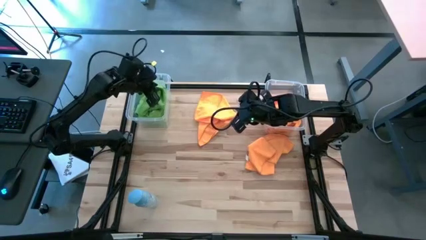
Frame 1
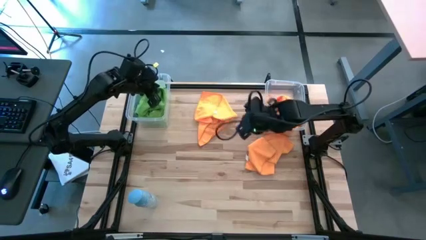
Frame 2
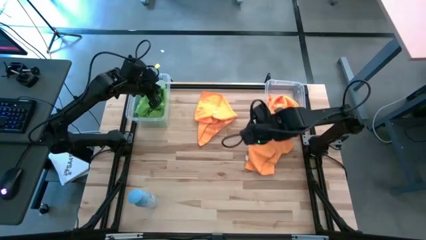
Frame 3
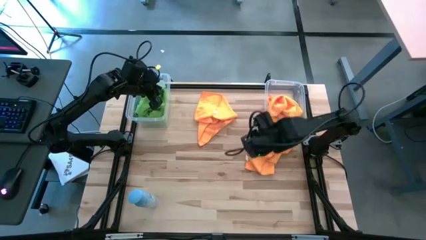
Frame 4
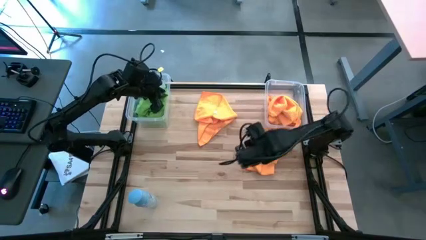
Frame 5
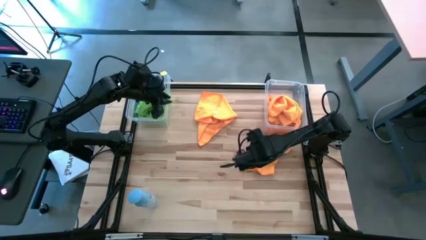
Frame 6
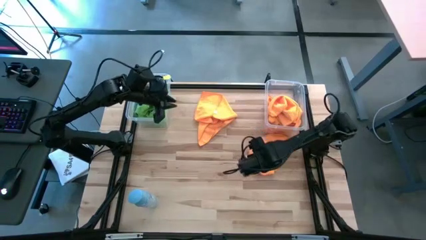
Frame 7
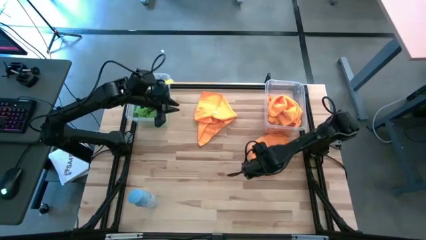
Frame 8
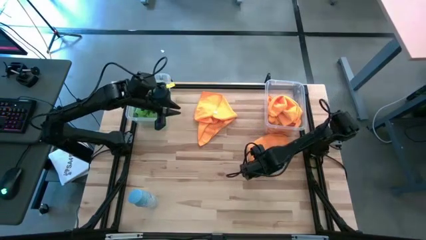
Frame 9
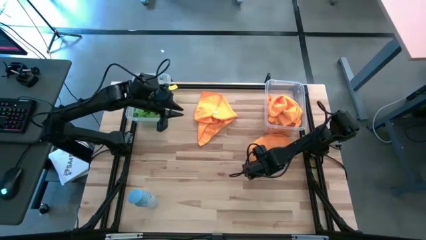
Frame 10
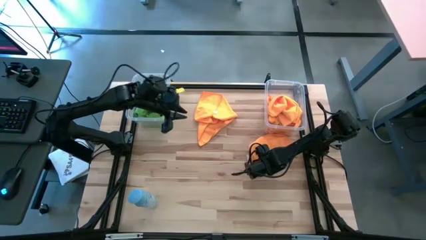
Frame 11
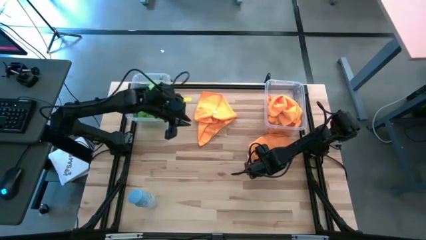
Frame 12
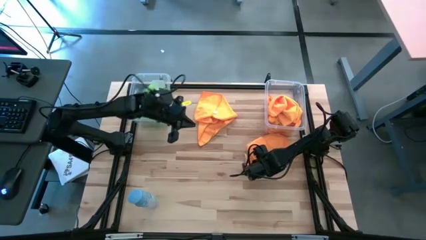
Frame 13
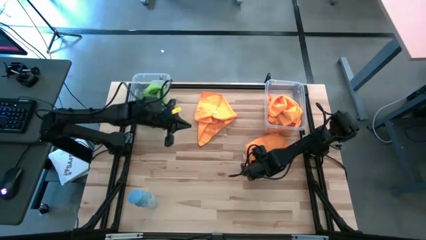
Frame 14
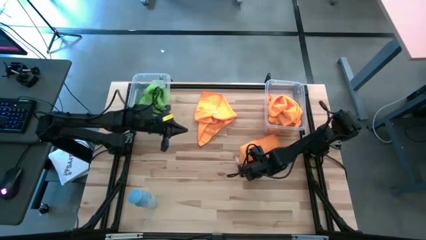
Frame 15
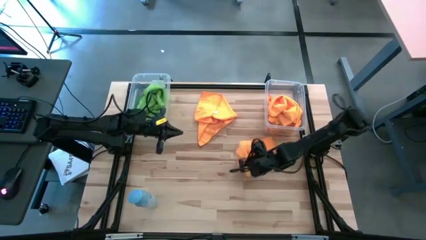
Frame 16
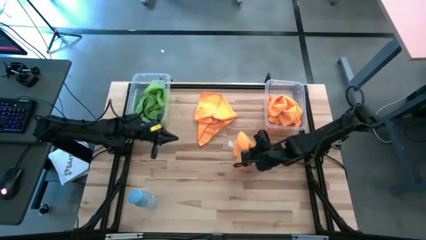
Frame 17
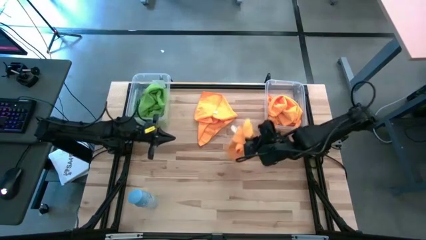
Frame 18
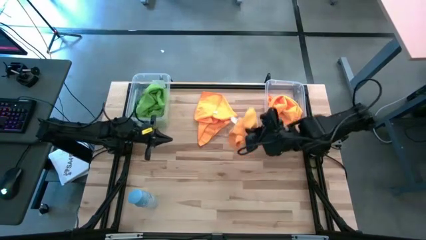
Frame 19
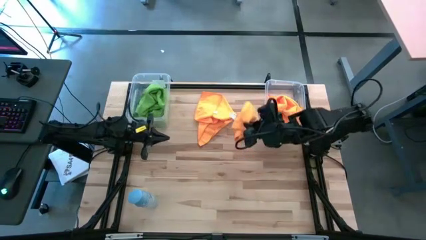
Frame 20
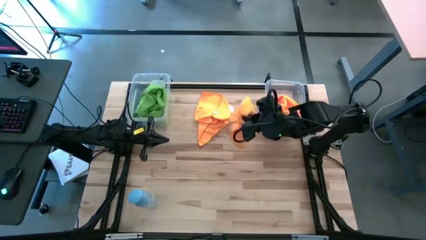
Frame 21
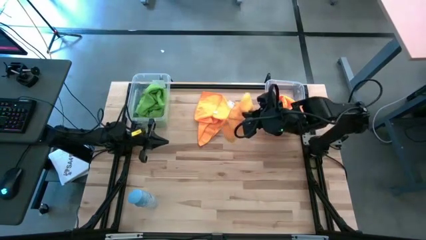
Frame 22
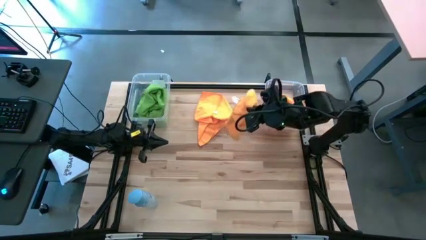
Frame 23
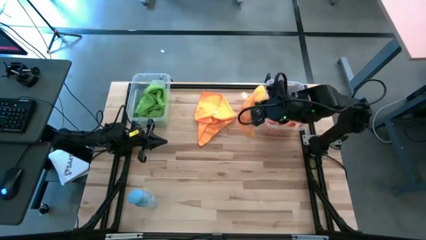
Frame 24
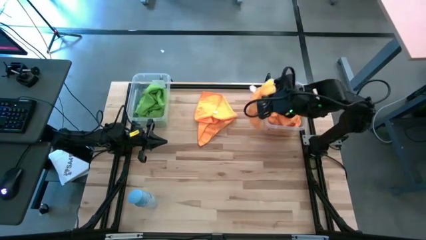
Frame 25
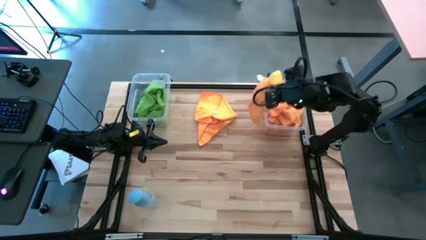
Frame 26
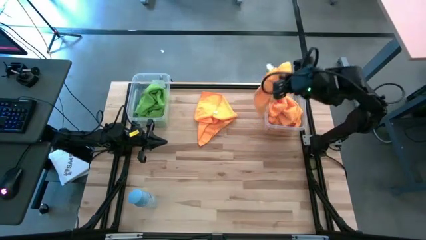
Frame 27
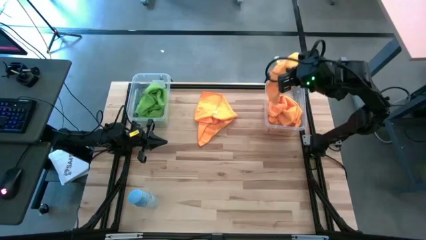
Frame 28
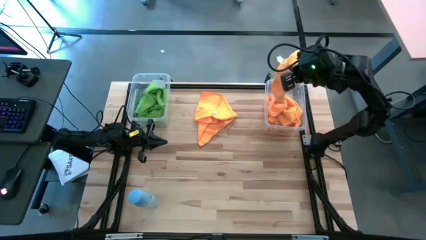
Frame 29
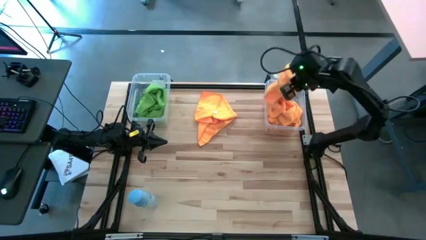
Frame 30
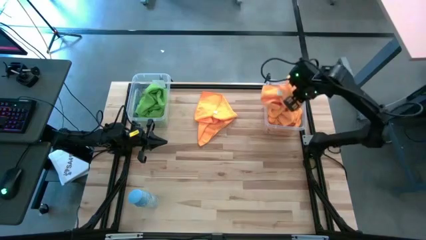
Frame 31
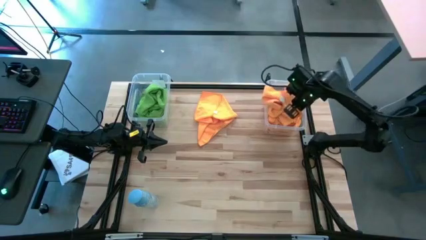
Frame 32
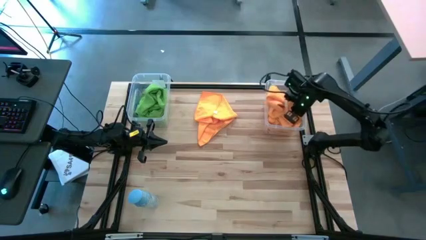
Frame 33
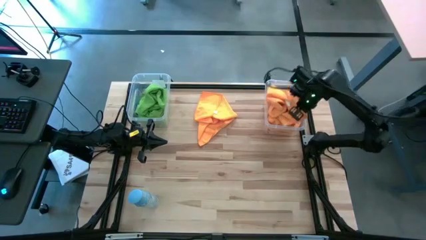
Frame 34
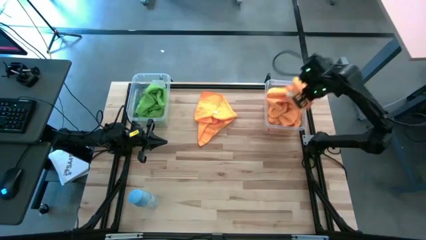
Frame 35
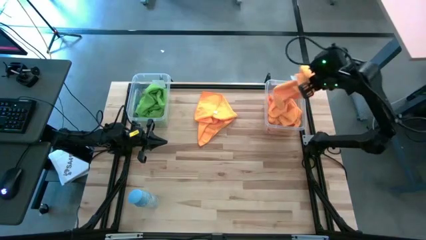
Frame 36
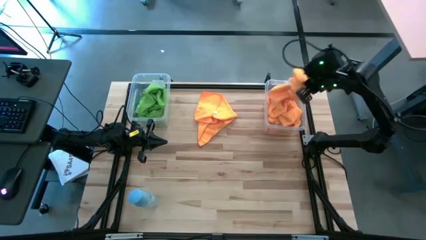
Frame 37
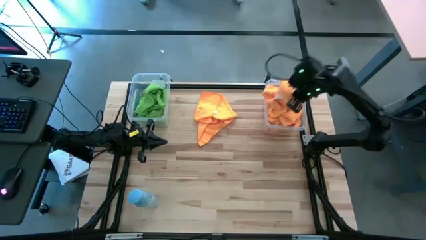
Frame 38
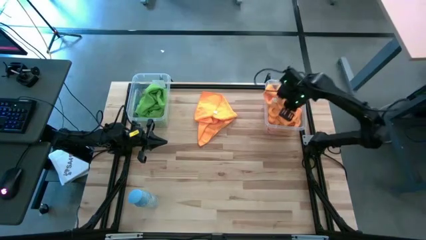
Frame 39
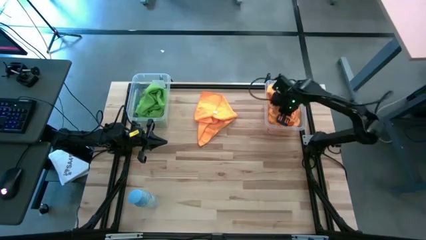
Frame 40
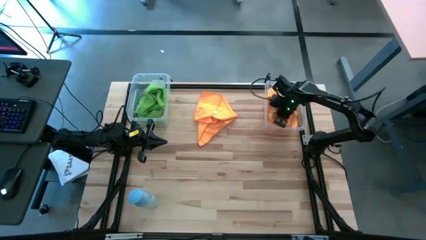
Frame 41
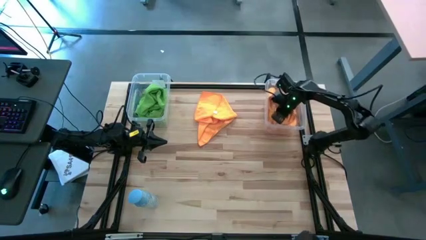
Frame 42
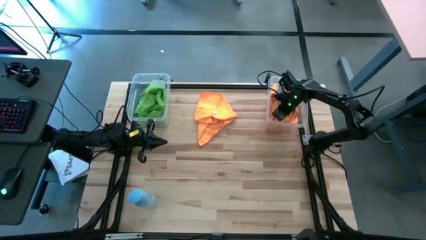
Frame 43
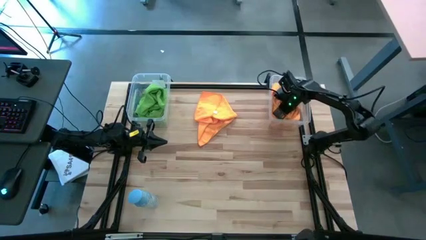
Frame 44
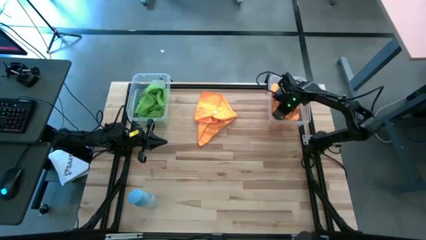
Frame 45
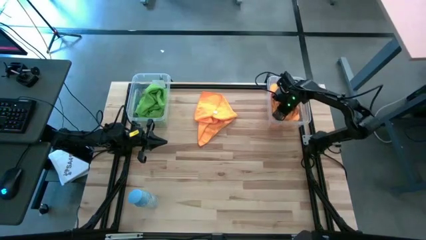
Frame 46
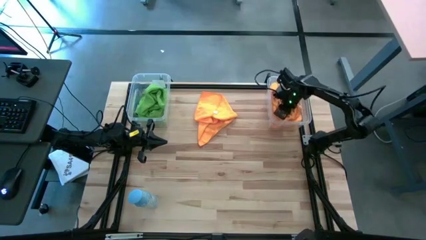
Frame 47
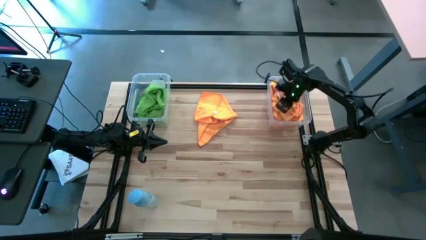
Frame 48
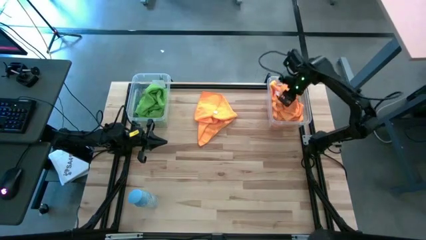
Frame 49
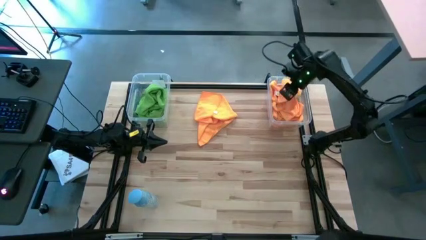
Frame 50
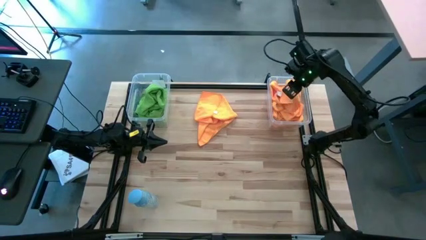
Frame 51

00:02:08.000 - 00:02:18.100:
Task: Sort microfiber towel by color & place in baskets
Put the orange microfiber towel into the right transparent bin
